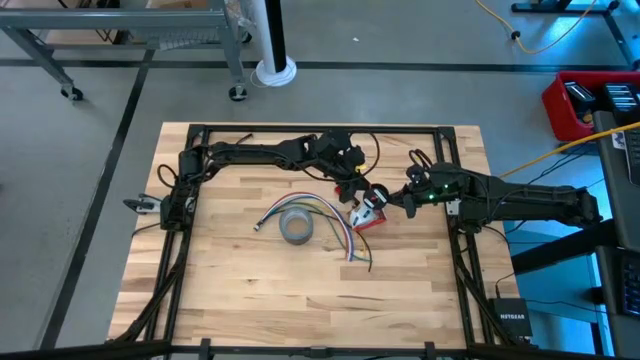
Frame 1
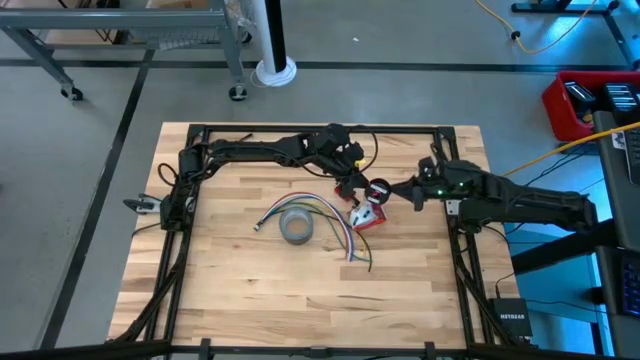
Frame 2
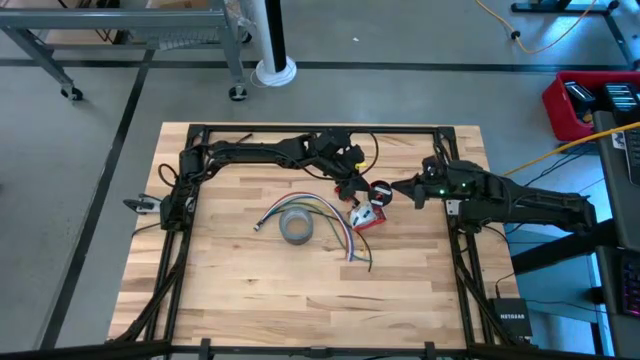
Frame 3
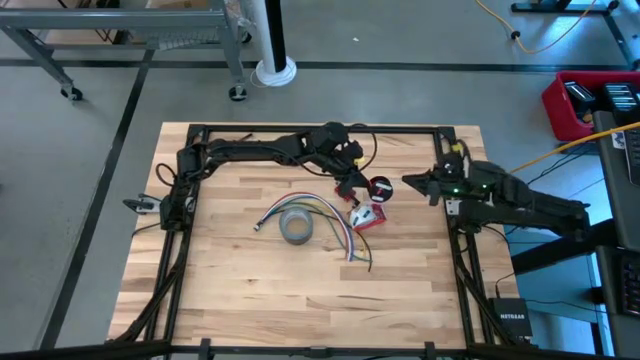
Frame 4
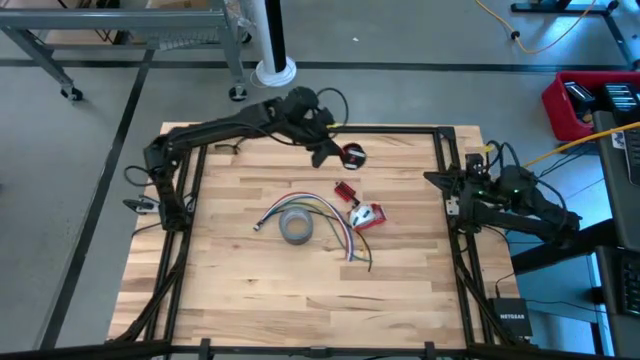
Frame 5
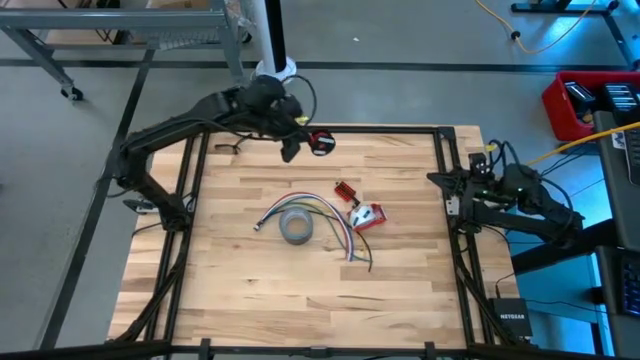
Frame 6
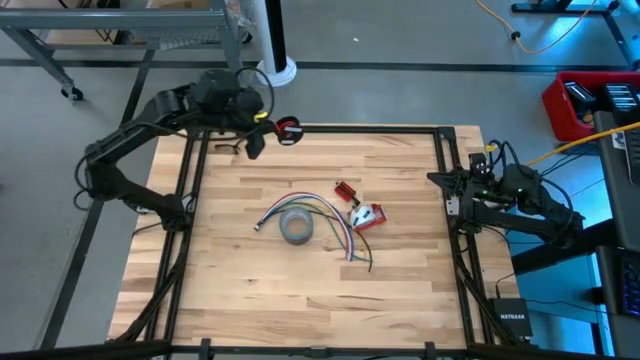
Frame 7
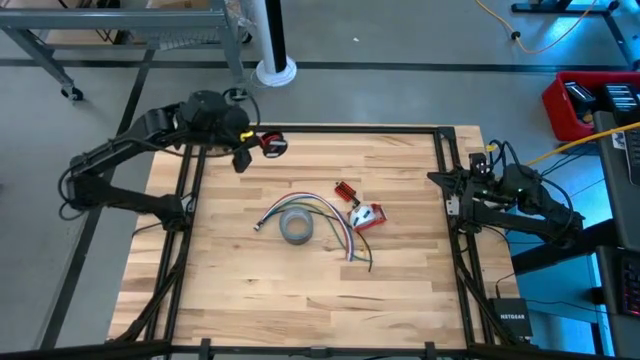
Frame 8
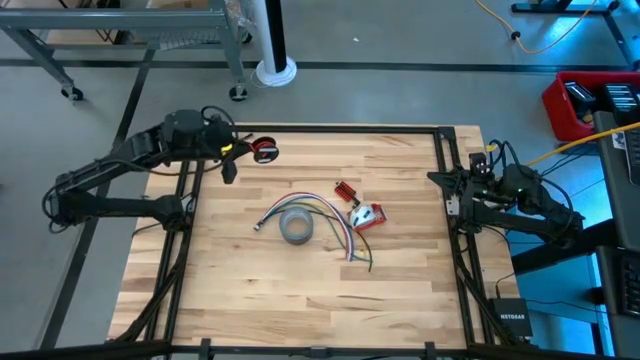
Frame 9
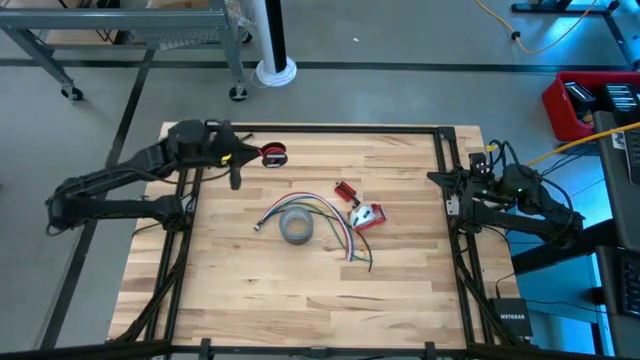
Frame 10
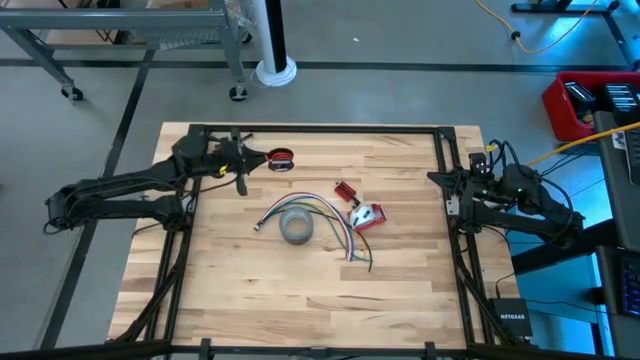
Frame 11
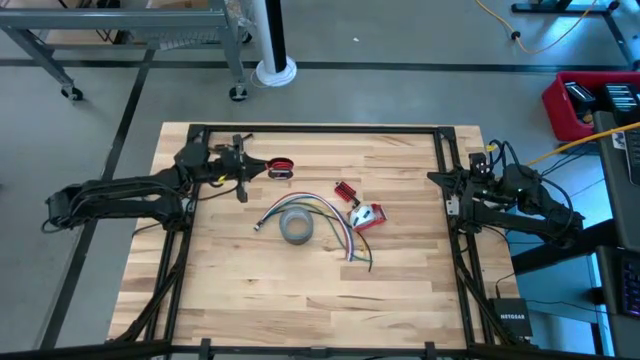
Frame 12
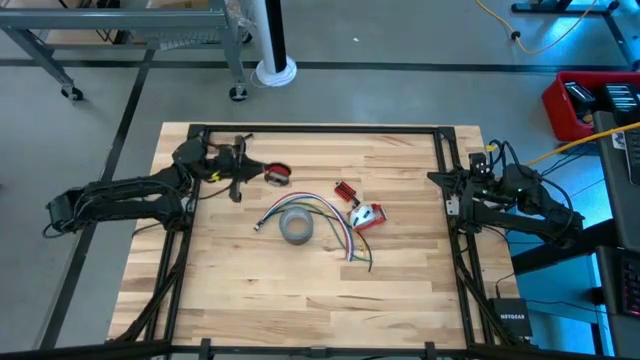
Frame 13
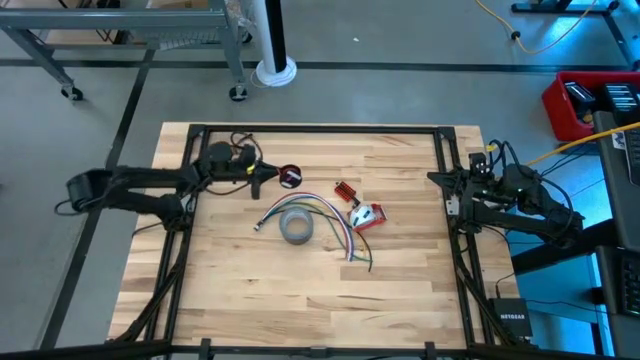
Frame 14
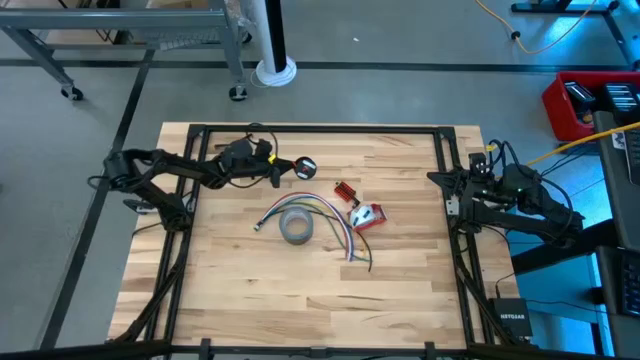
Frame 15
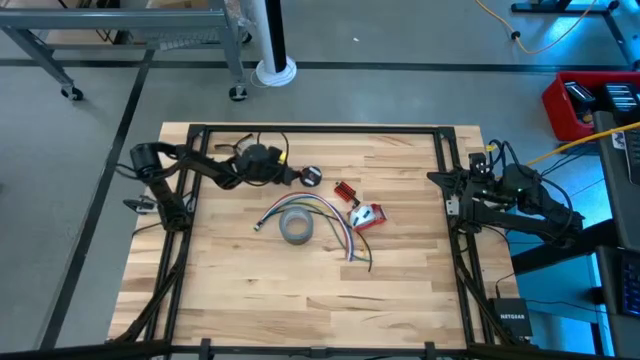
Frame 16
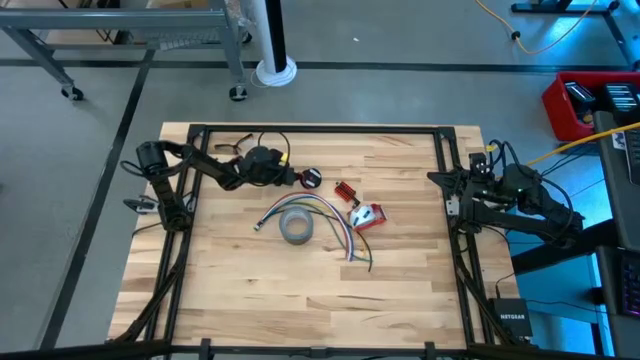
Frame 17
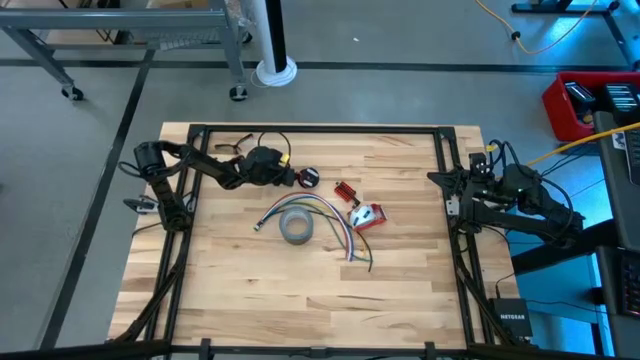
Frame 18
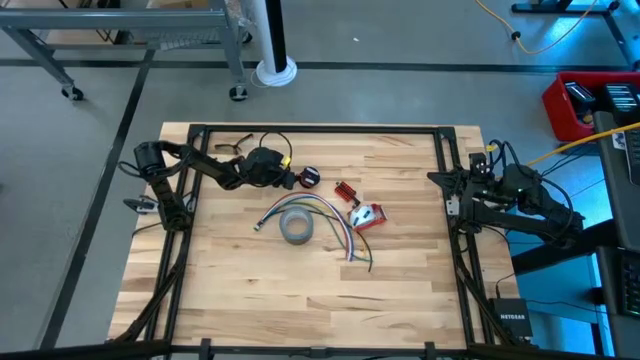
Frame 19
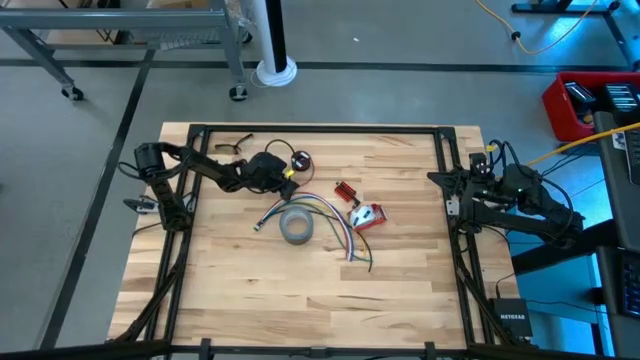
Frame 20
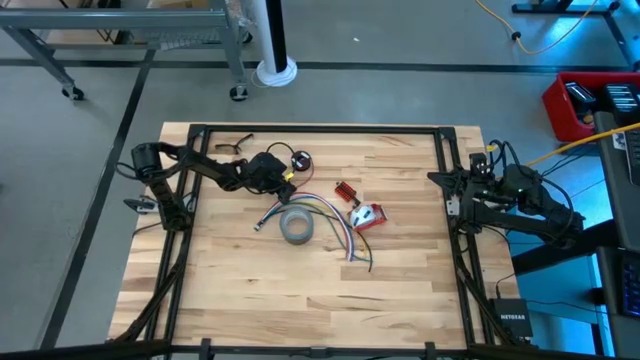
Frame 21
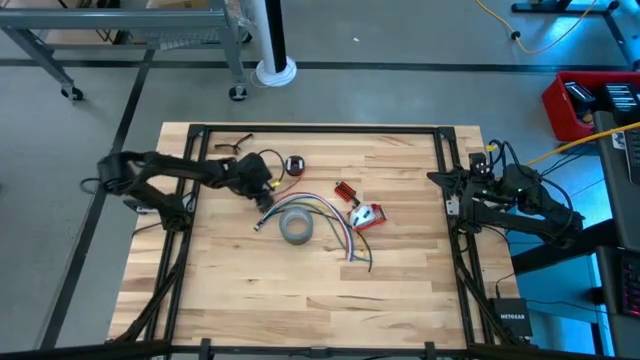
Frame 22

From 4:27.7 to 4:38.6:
Task: Coil cords
Put the black spool on the table

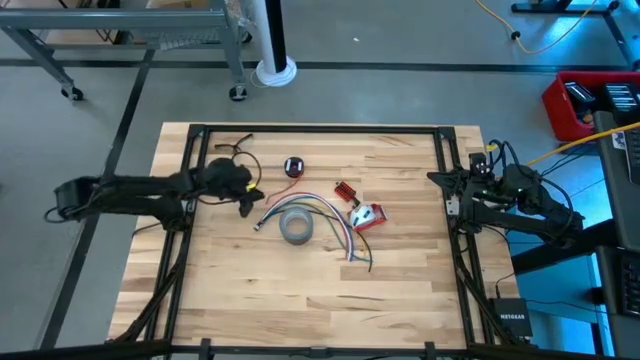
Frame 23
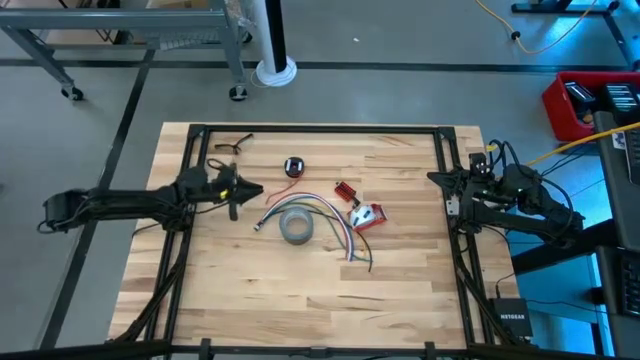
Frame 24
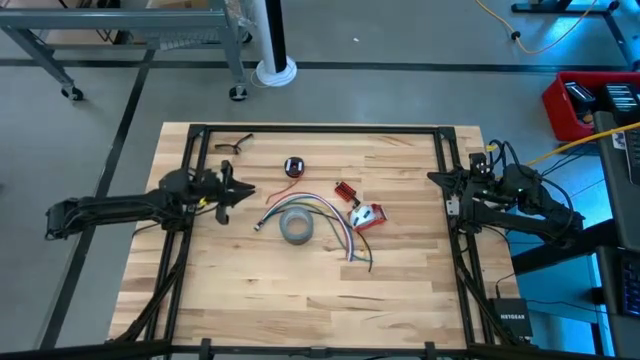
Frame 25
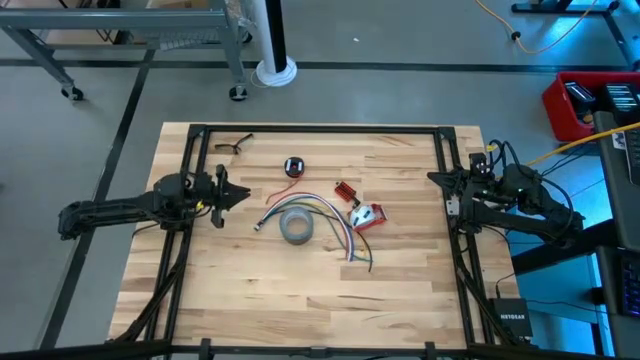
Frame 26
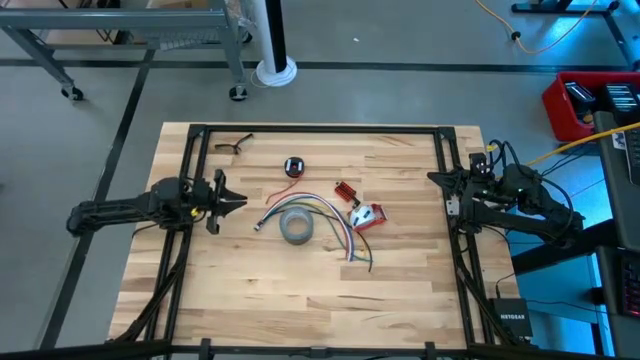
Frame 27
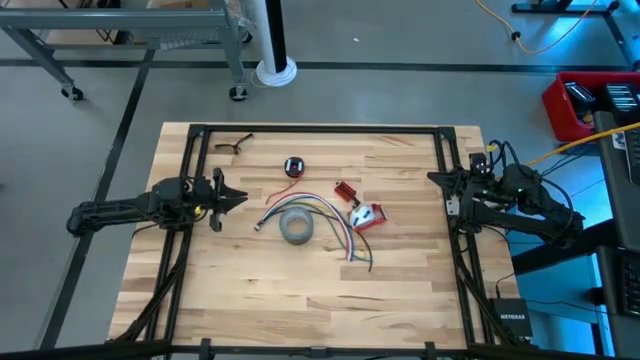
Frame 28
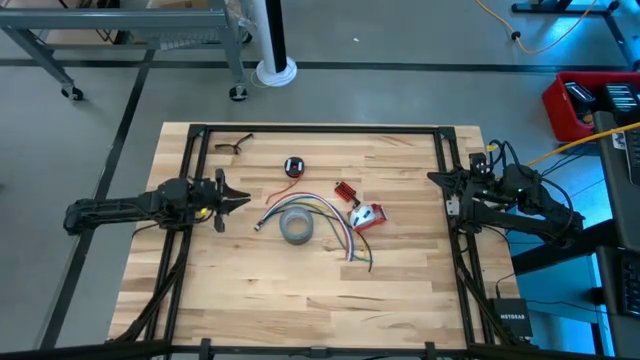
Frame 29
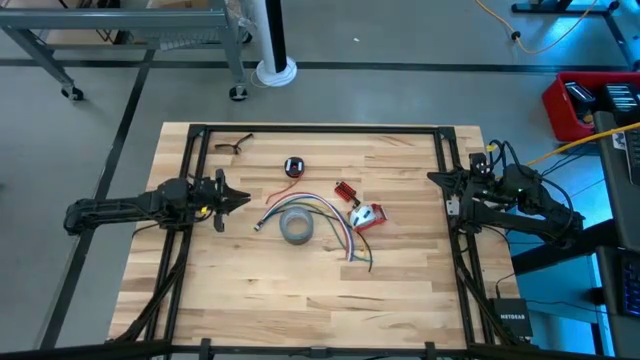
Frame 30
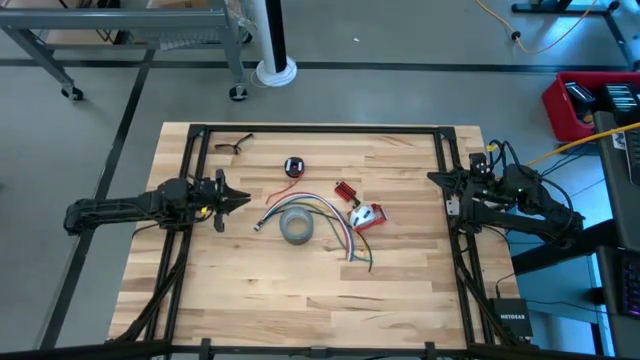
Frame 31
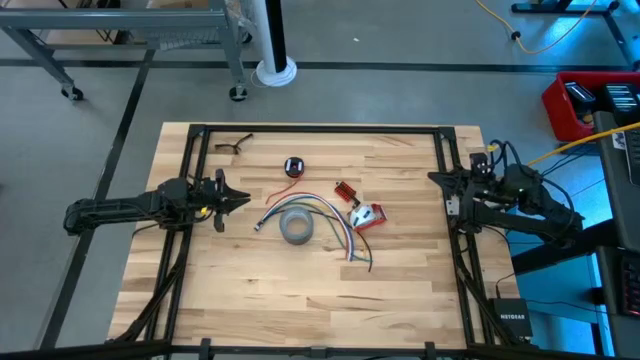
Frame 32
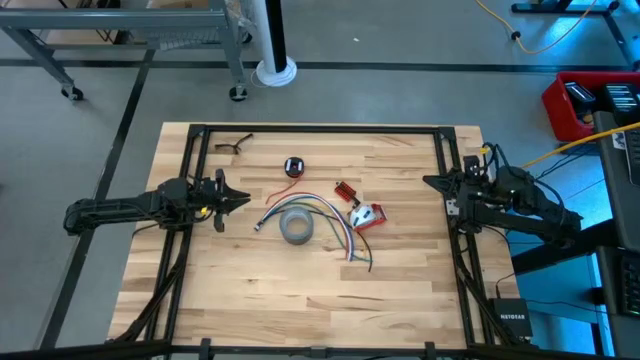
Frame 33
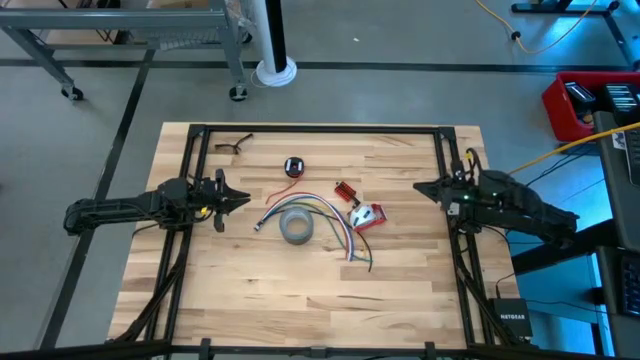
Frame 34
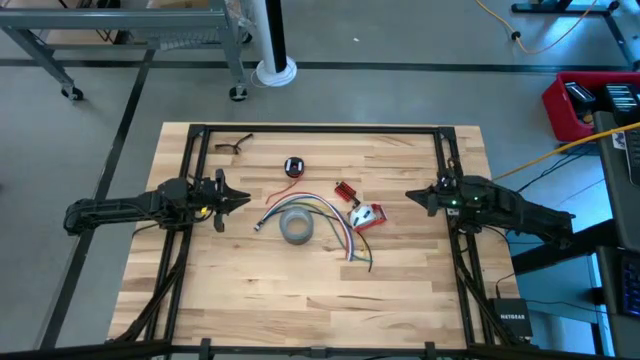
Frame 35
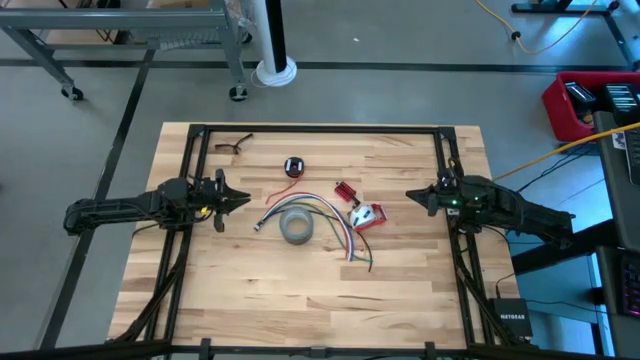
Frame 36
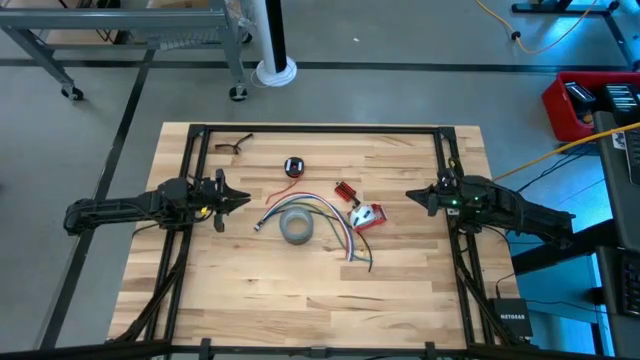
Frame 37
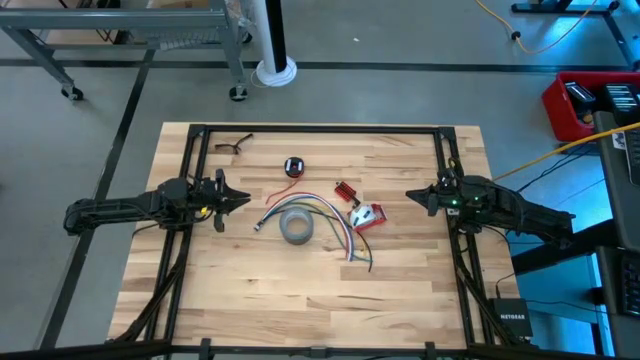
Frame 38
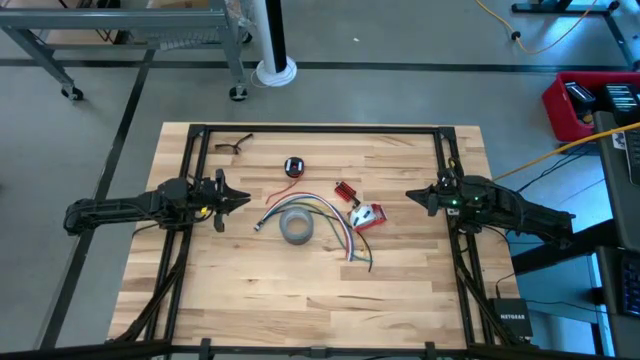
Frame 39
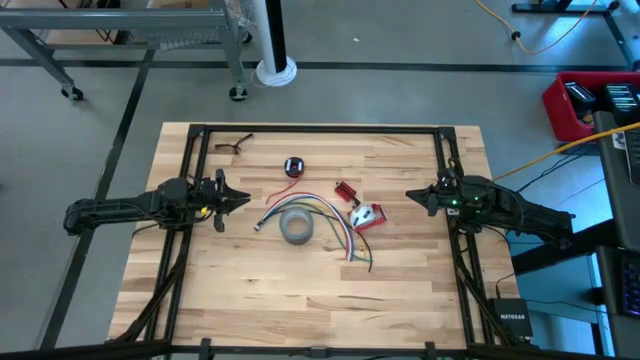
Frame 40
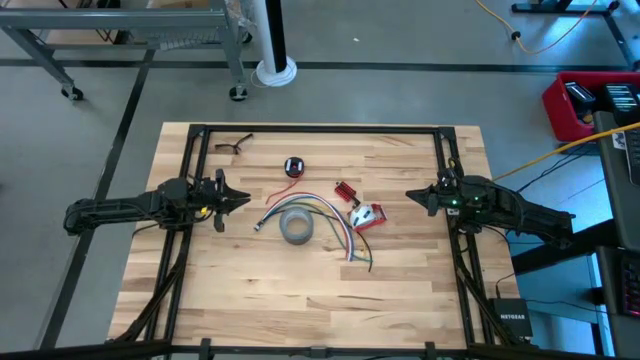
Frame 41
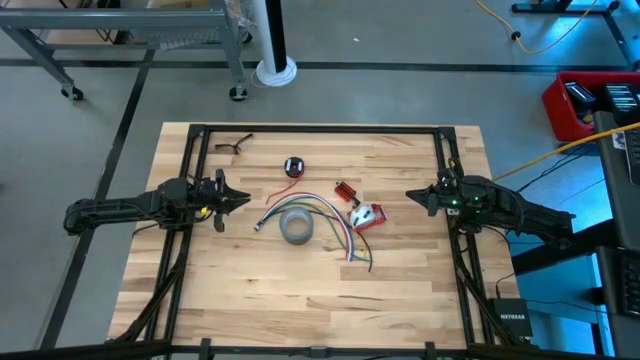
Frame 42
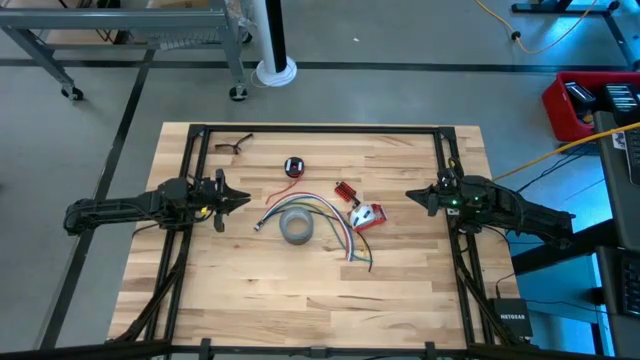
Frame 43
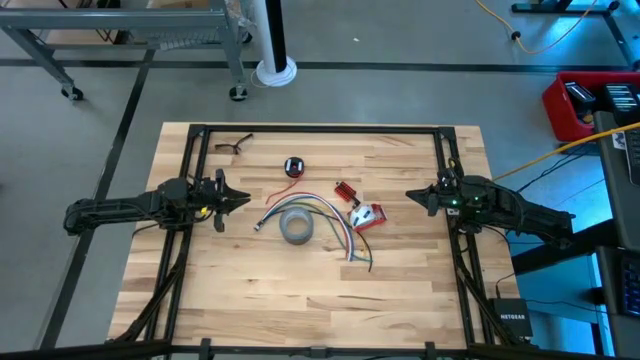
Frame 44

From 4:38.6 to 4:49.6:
Return to Home Position
